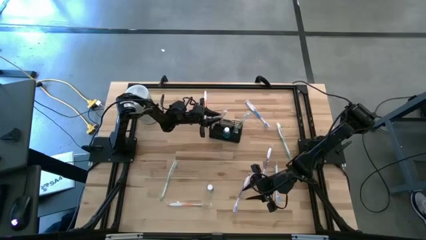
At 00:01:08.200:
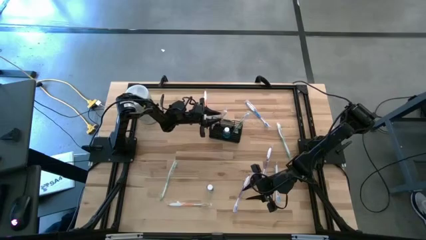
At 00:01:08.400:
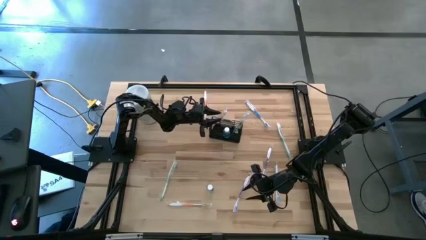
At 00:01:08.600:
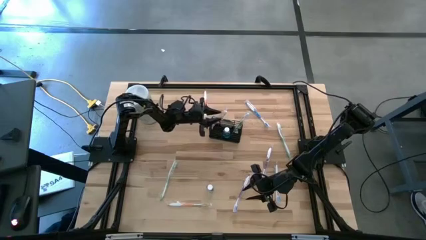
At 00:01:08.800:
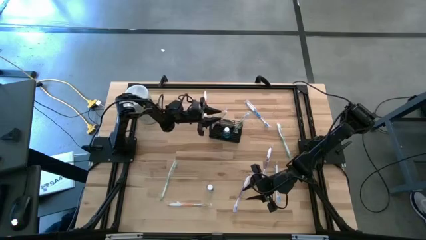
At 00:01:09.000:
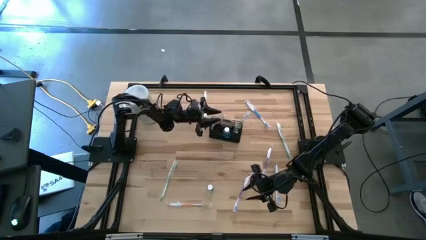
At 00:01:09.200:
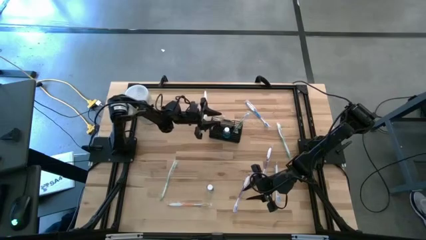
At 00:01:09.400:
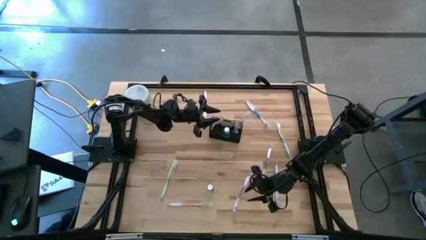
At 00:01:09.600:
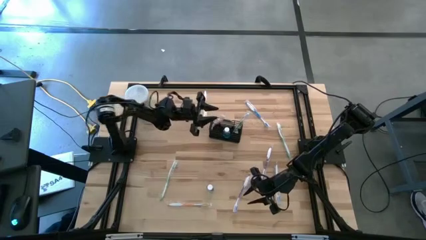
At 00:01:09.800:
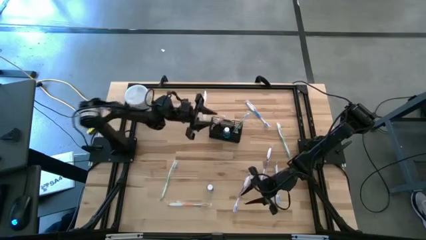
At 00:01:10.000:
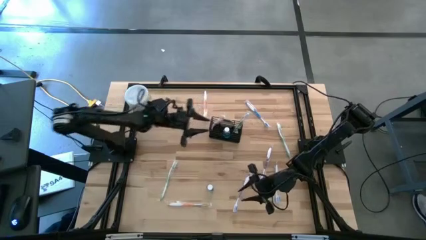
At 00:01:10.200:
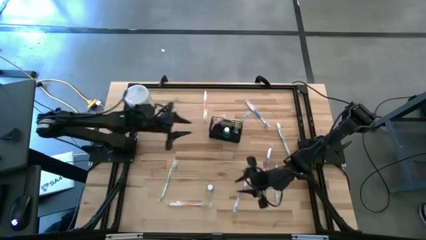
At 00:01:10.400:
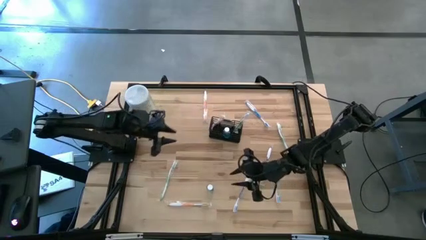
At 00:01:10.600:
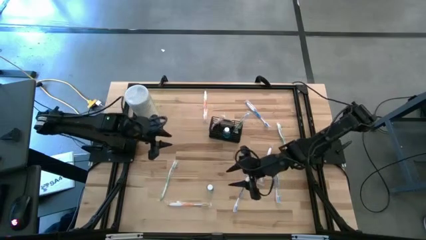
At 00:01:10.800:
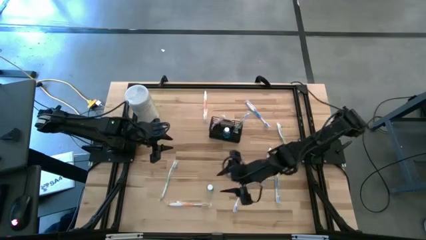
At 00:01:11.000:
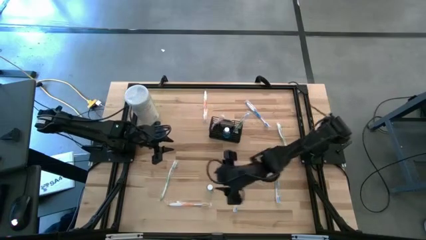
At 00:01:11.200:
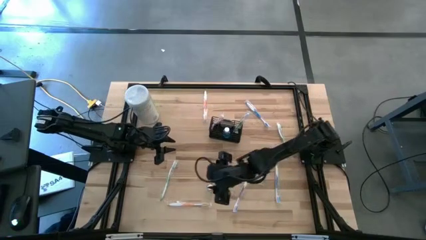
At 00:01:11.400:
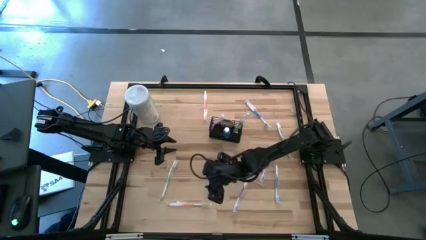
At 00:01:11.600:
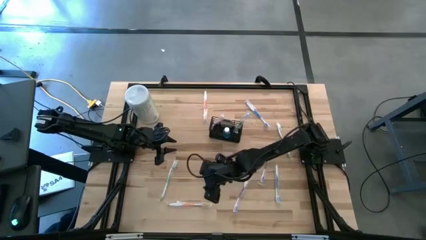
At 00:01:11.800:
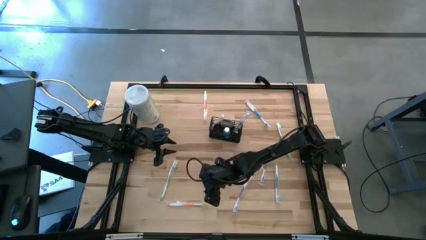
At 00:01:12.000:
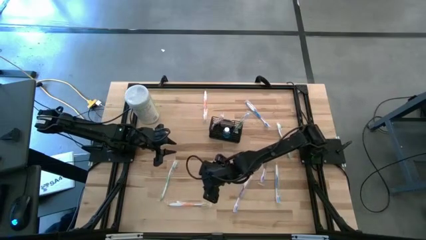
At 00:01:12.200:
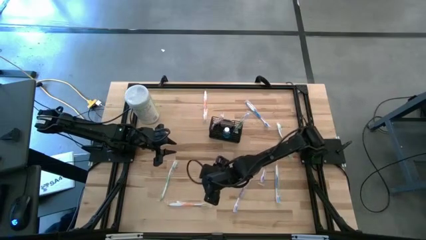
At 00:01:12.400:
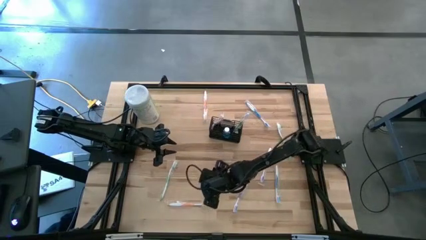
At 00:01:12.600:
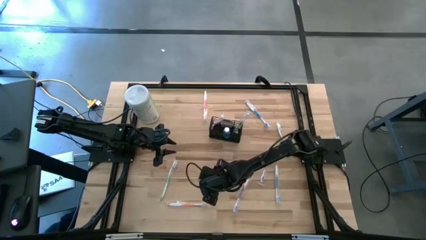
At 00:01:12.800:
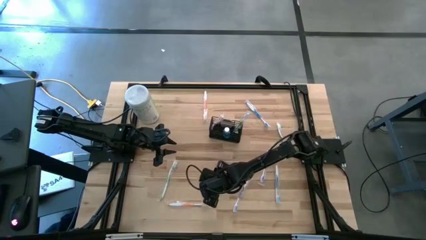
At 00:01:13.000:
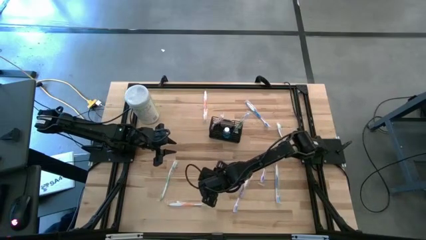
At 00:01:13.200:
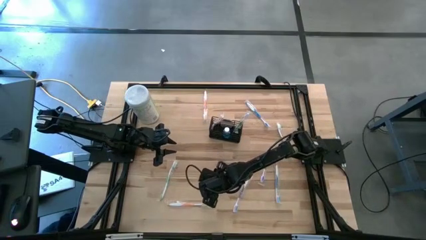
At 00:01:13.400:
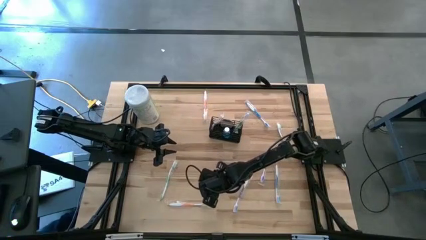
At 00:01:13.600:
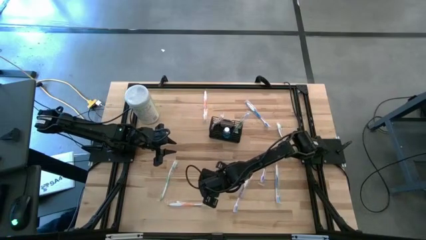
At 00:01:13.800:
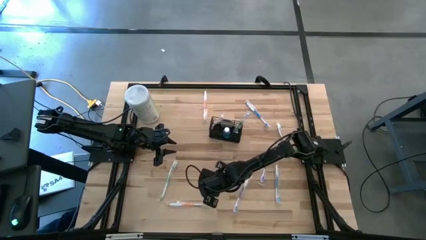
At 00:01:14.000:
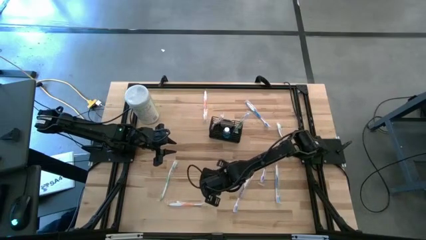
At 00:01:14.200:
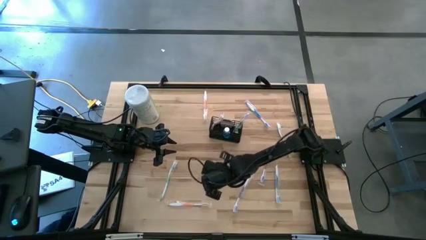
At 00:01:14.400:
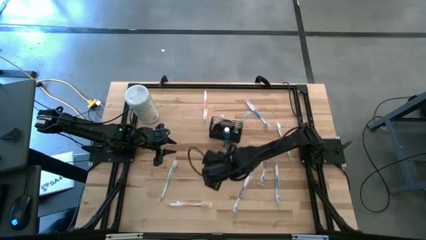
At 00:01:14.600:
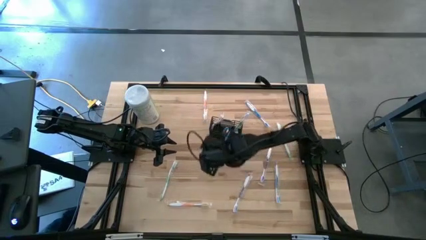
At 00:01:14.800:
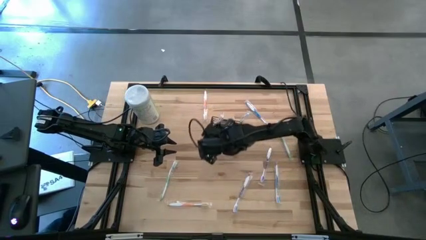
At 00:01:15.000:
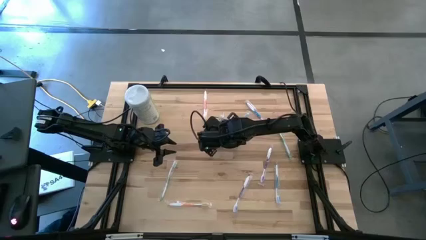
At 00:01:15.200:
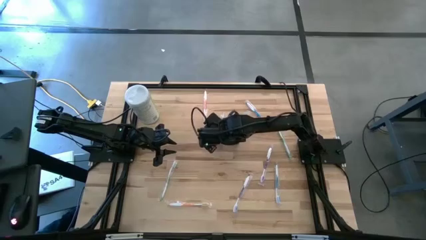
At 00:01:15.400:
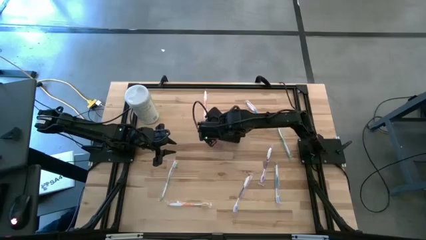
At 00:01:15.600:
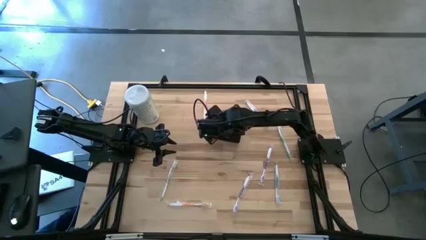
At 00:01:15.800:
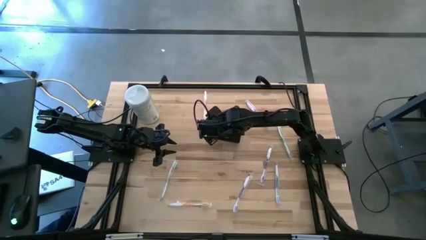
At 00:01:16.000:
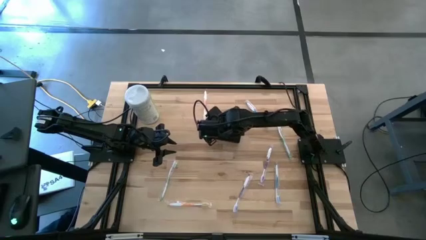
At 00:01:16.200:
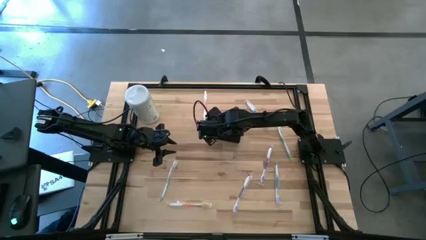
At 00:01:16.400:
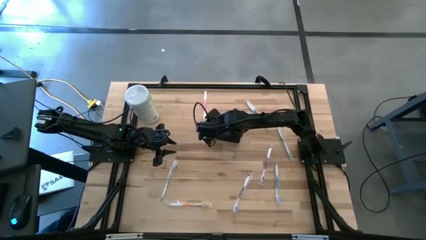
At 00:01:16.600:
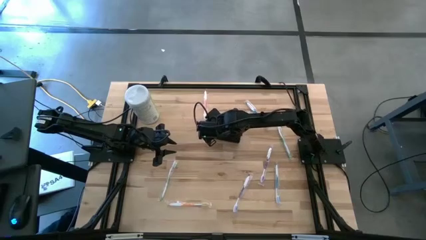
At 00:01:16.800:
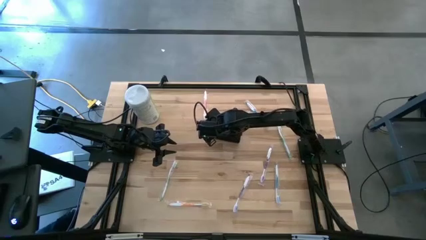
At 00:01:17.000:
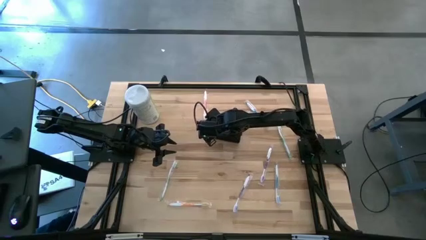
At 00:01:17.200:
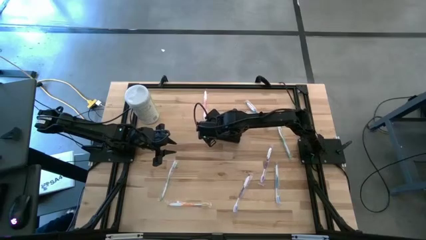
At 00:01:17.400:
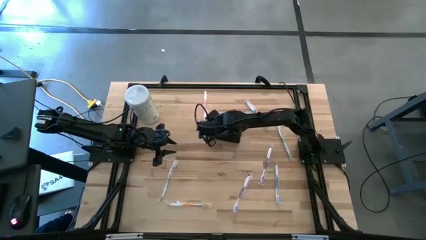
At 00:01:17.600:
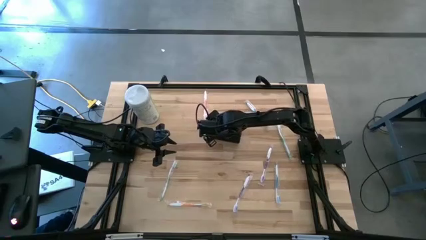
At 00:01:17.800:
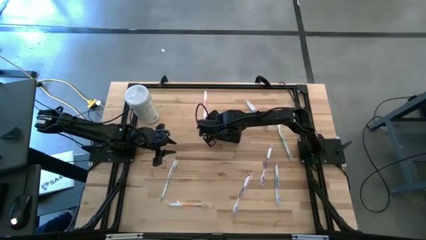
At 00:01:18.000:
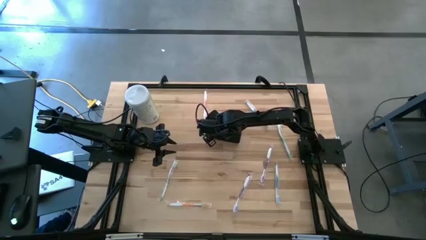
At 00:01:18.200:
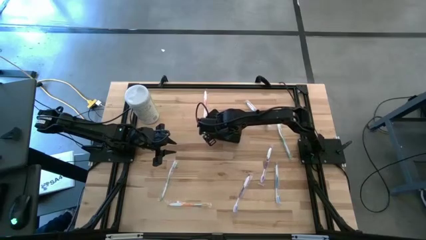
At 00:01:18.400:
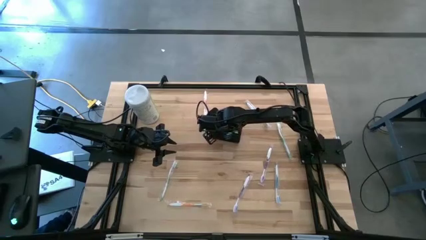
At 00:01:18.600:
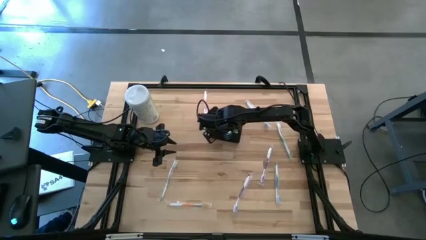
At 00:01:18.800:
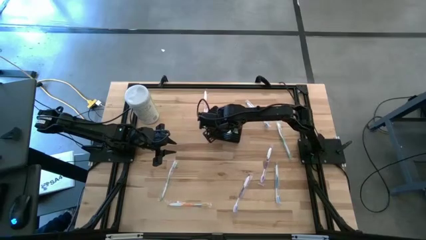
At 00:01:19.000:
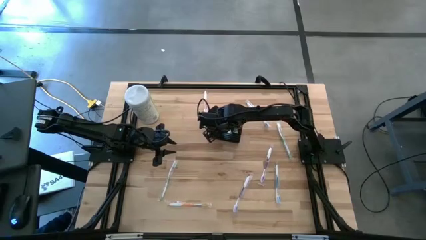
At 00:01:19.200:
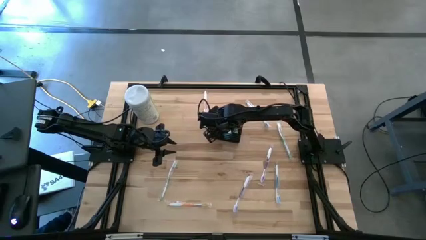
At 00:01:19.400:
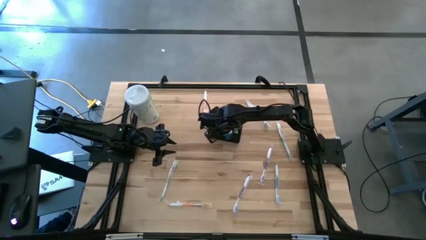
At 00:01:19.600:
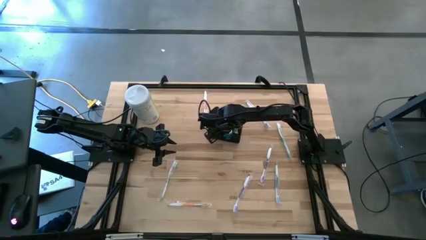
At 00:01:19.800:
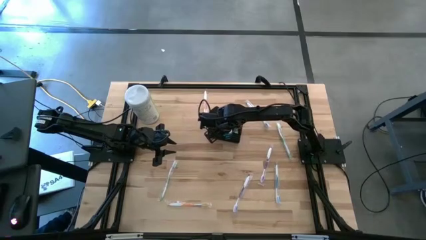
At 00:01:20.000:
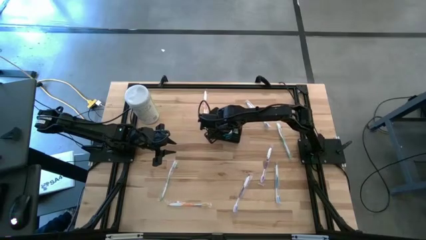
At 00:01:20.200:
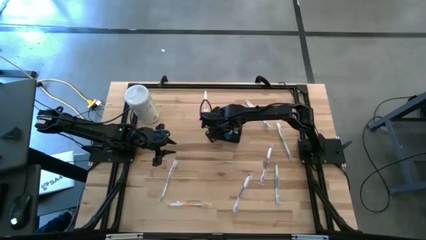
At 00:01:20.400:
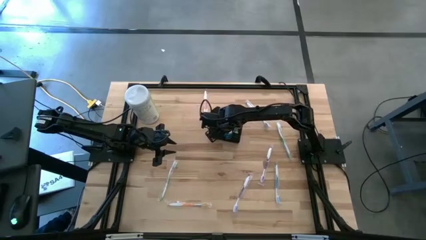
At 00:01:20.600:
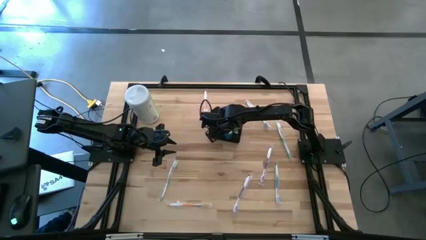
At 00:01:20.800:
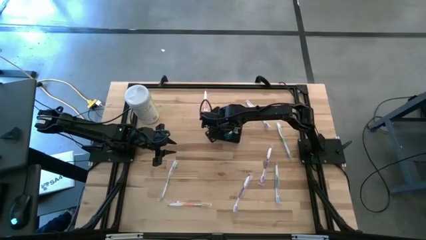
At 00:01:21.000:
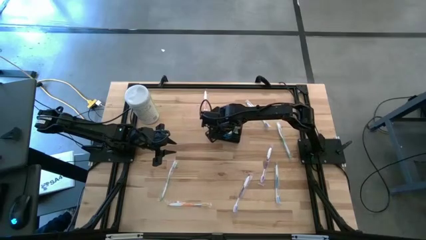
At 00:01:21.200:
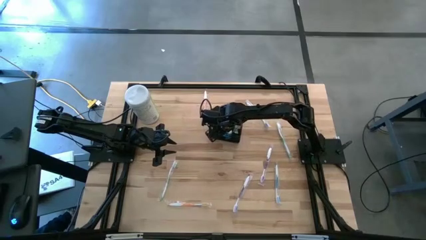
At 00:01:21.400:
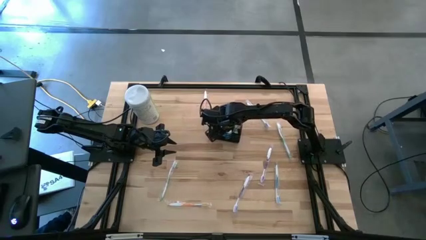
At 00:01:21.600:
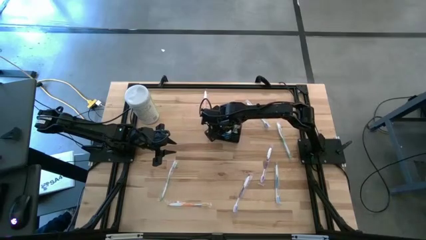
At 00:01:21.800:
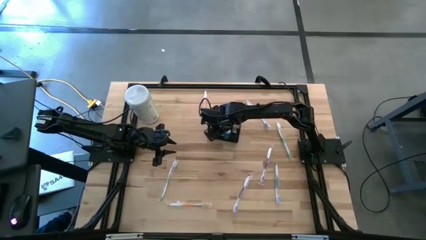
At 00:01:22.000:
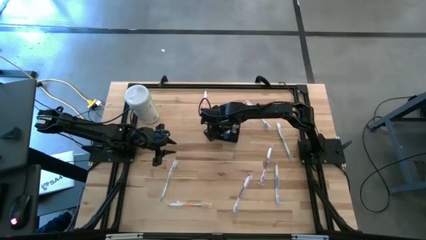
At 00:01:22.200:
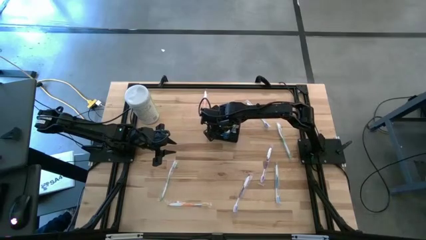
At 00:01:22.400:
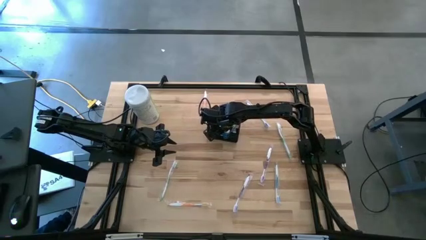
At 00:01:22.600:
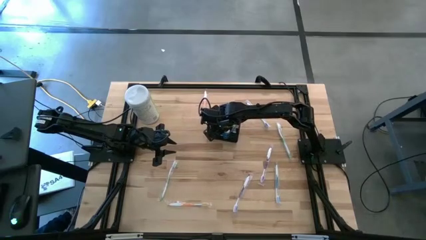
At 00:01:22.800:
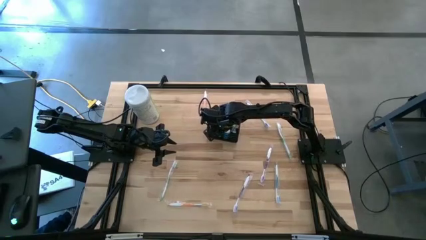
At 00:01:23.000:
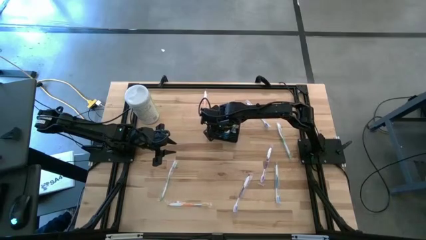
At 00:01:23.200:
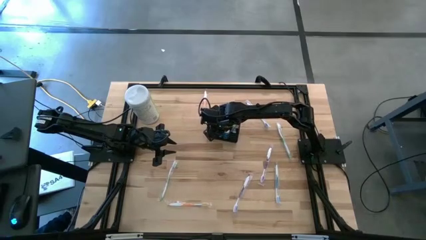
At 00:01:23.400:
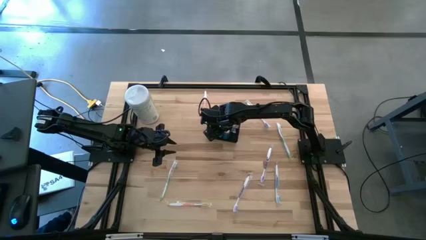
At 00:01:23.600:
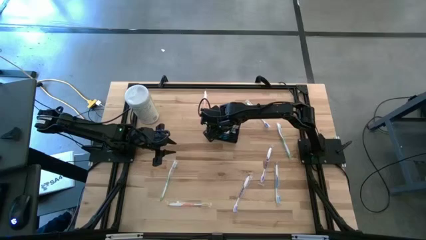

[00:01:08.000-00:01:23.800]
Task: Pick & Place toothbrushing station
Put the mouthwash into the mesh organizer
